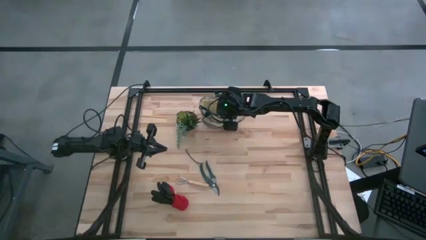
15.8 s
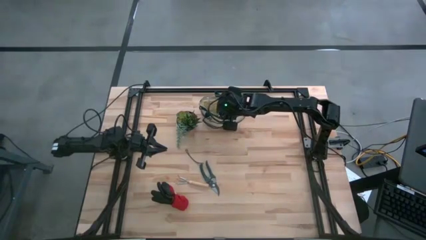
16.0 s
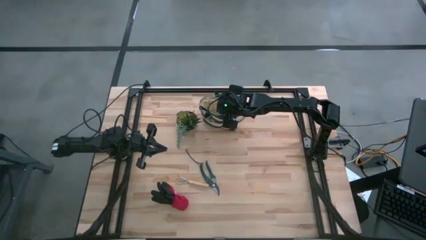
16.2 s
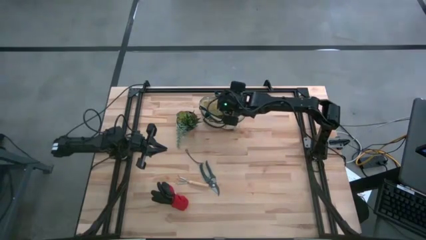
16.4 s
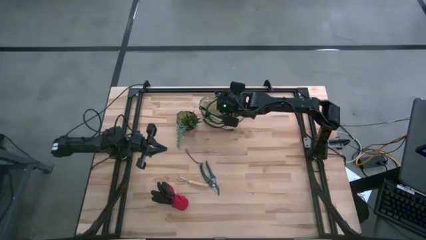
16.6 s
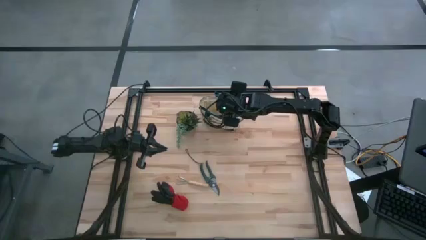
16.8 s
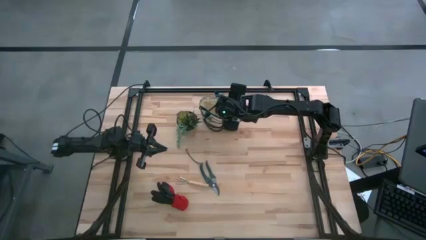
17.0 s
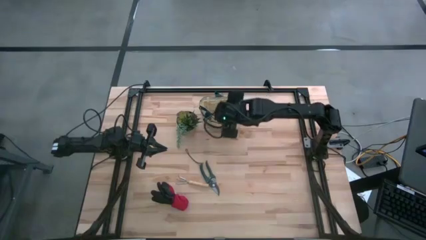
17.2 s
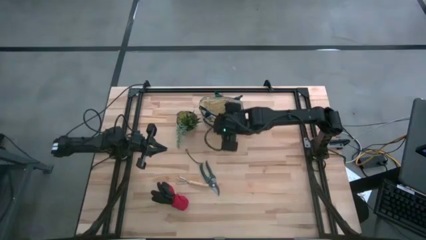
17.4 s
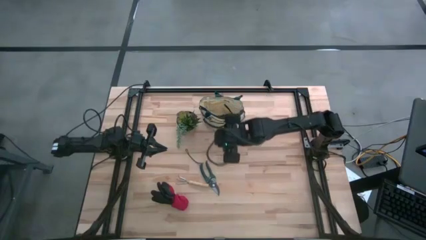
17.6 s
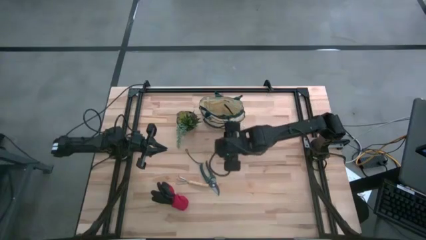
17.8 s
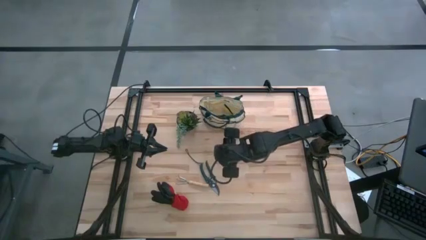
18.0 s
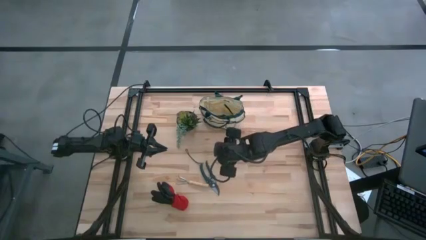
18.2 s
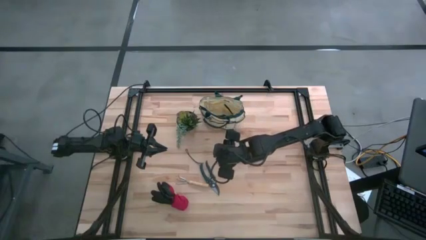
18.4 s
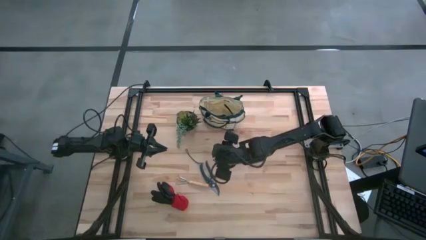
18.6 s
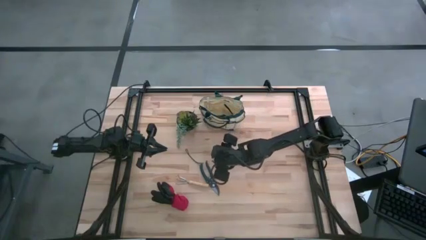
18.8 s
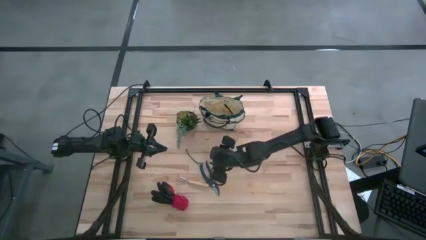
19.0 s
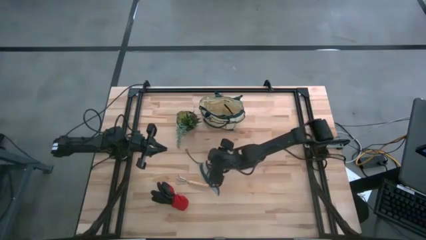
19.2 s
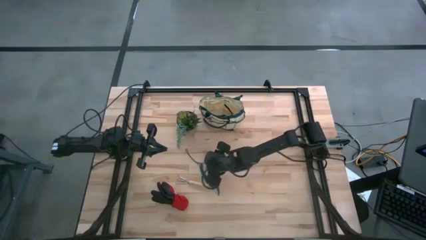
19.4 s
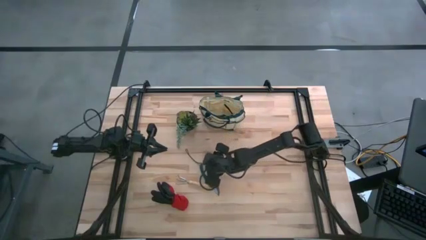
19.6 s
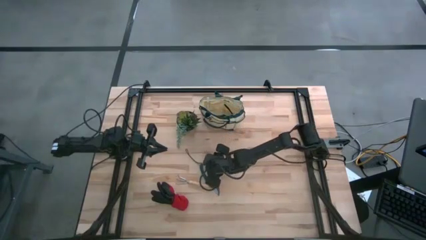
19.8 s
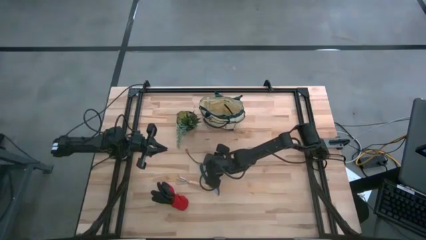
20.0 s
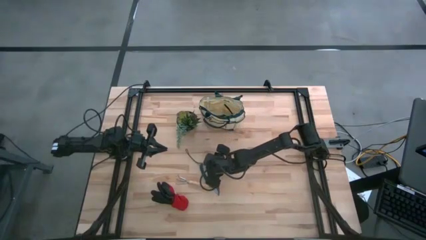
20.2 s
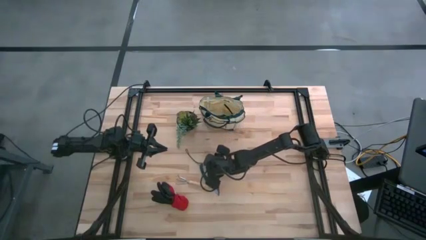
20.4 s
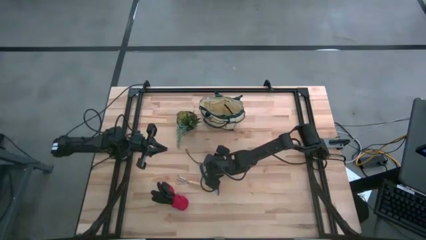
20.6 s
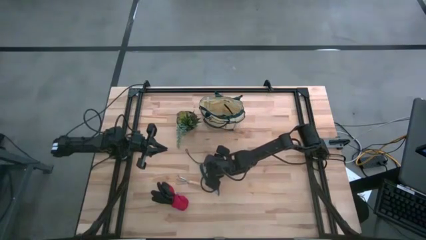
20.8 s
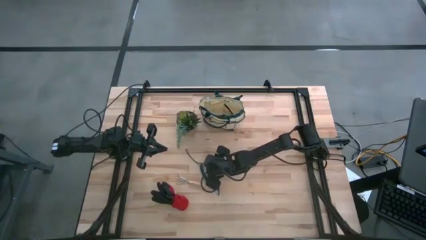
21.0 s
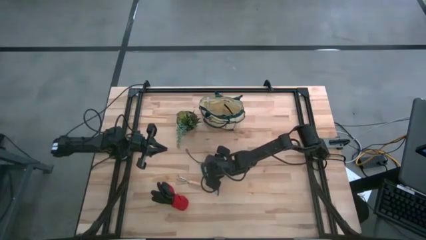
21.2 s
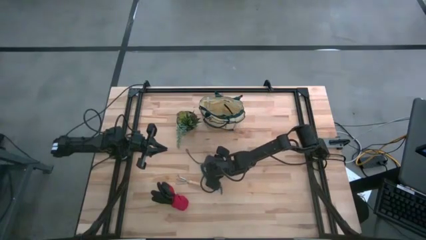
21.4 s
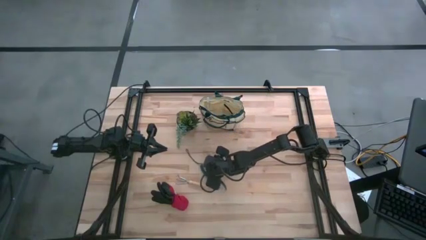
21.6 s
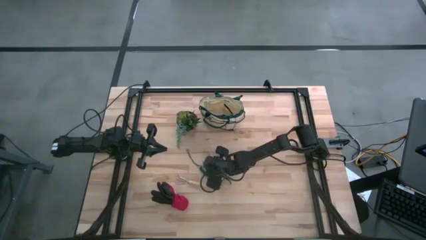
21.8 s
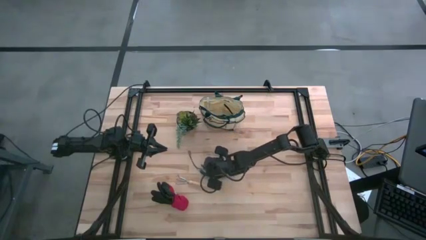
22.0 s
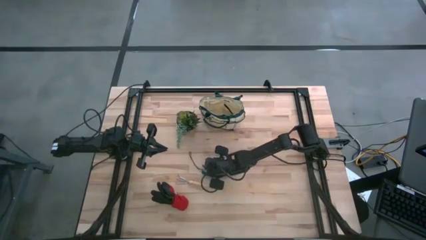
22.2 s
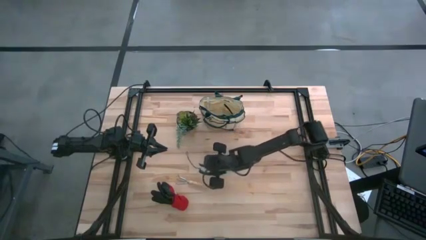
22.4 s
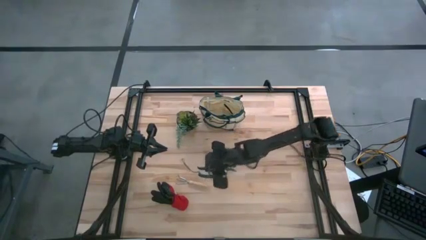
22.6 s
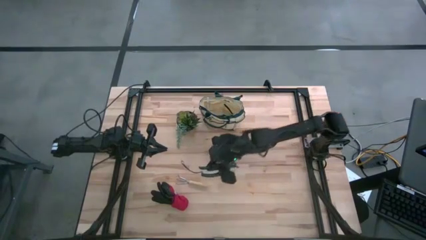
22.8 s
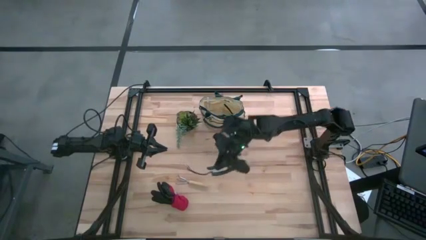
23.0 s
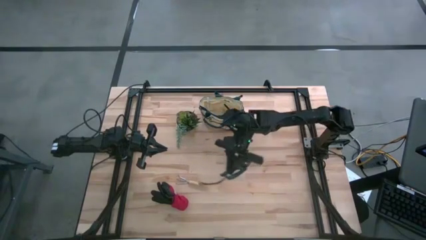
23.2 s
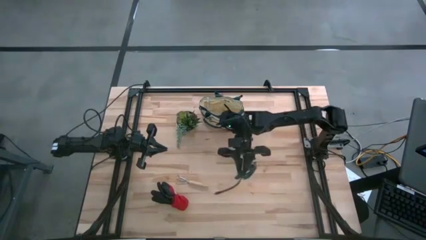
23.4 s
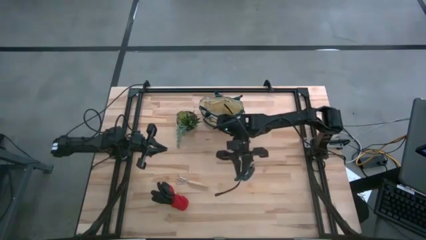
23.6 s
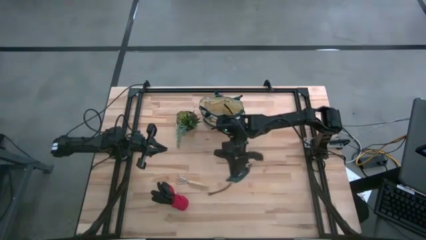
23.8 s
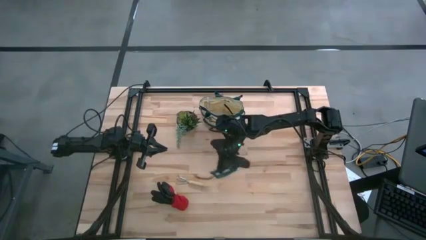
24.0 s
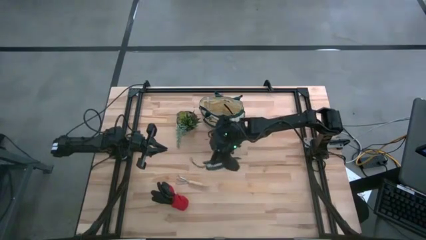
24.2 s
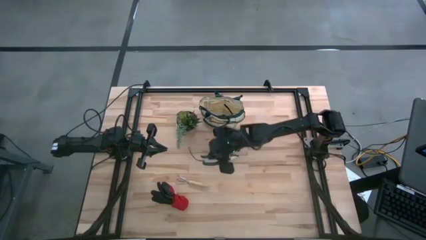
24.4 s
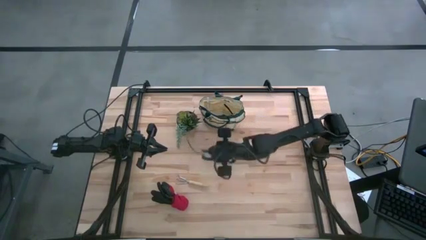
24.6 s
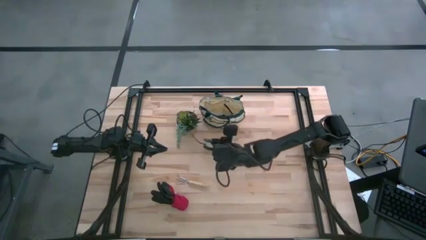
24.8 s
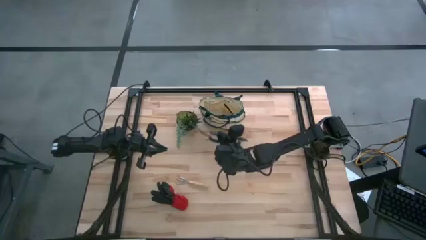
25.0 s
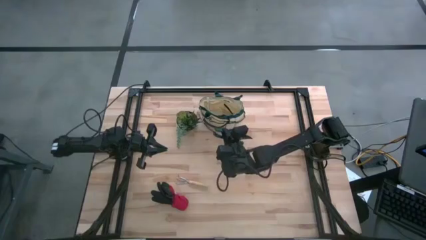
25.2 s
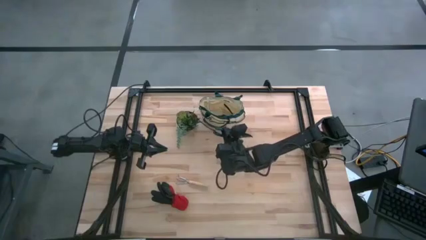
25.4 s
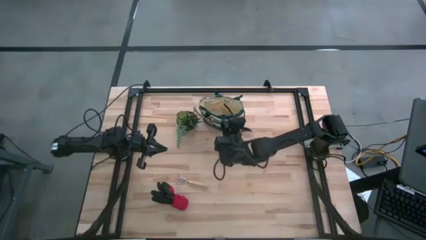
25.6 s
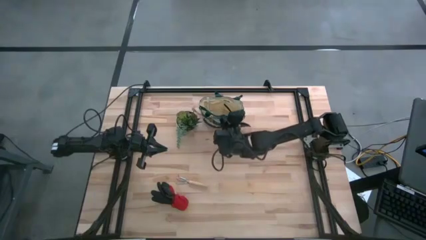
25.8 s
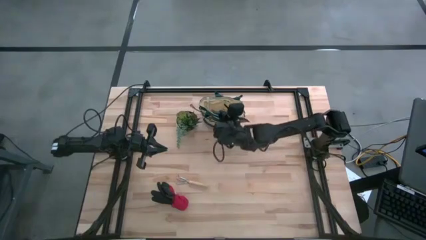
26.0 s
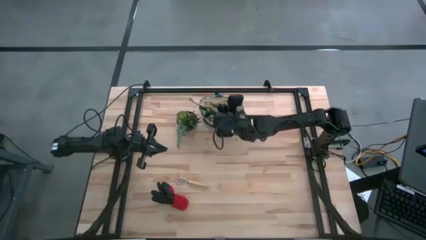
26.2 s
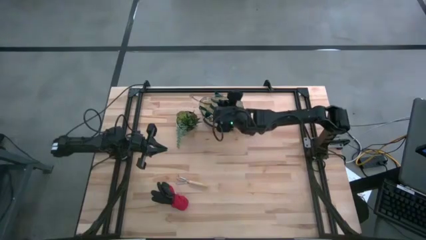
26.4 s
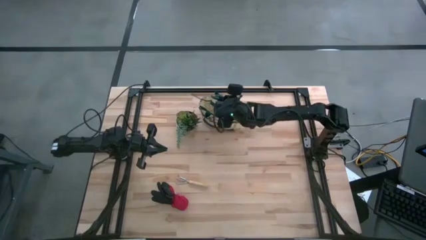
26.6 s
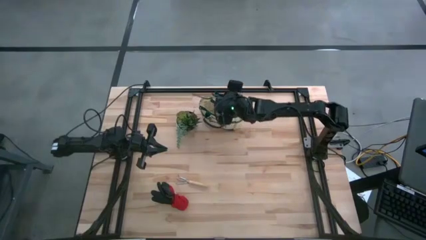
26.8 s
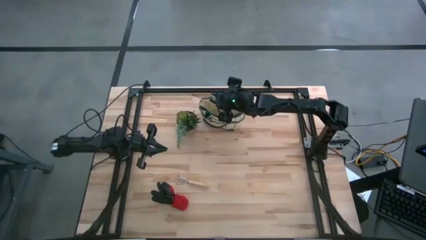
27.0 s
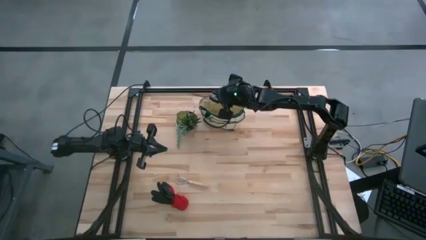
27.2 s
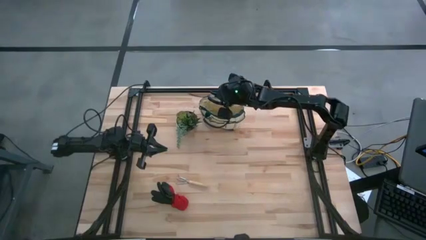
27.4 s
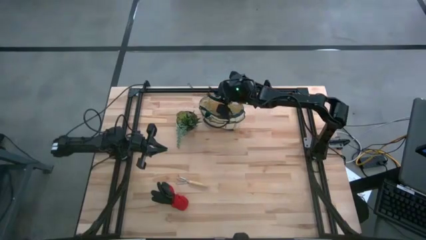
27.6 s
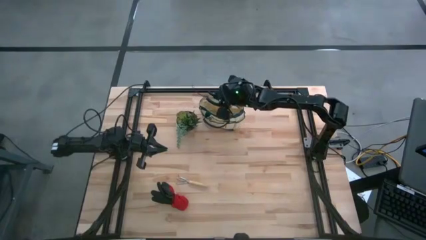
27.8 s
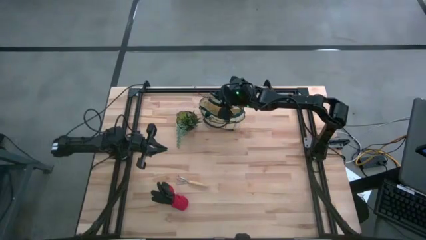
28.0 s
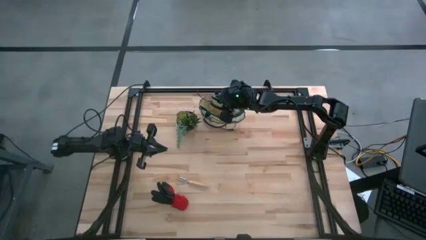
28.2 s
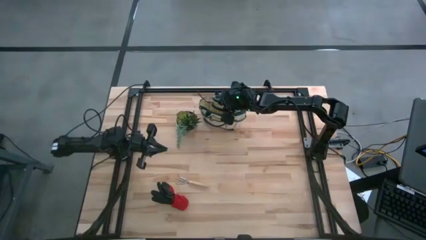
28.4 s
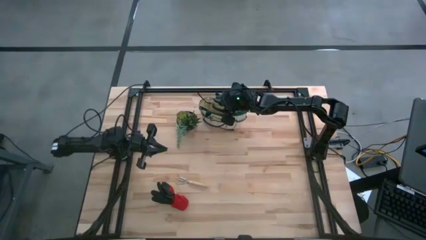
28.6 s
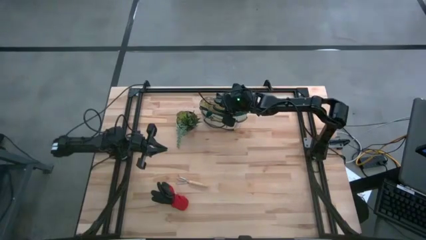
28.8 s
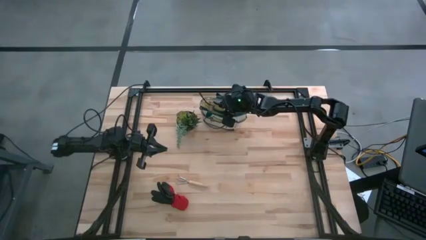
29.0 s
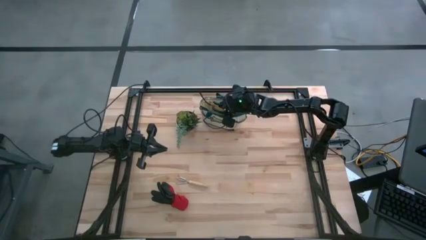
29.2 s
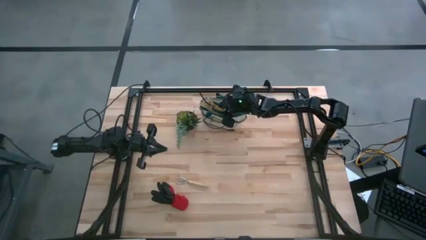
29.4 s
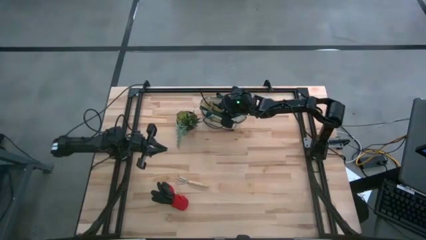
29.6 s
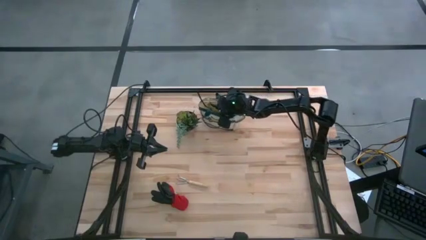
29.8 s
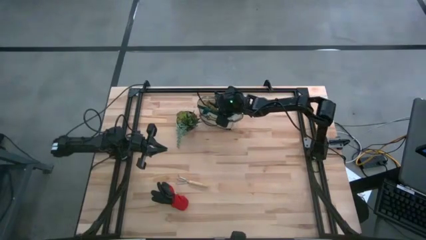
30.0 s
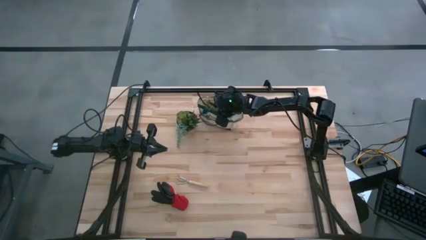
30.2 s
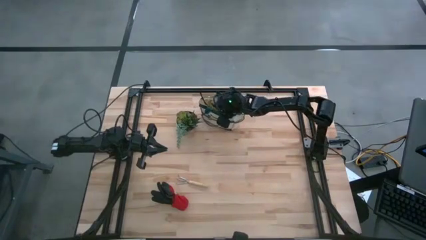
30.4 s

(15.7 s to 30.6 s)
Task: Pick & Place Garden tools in Gardening bag
Put the green shear scissors into the gardening bag
